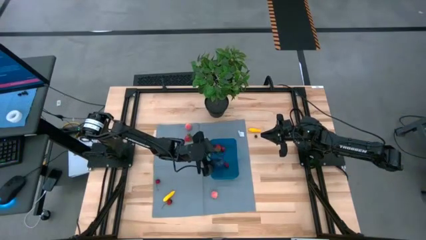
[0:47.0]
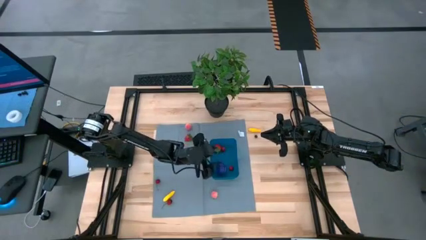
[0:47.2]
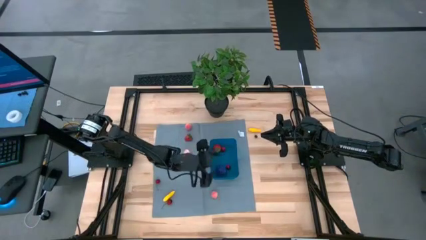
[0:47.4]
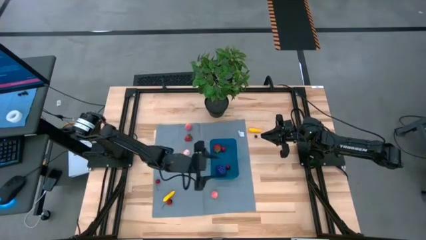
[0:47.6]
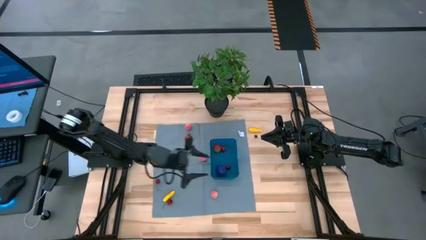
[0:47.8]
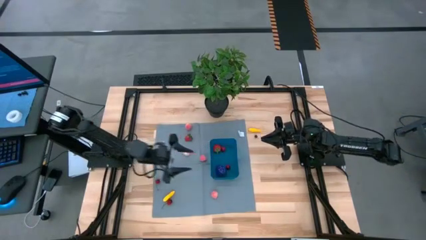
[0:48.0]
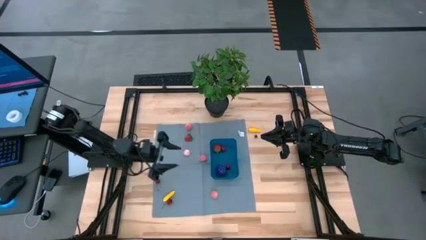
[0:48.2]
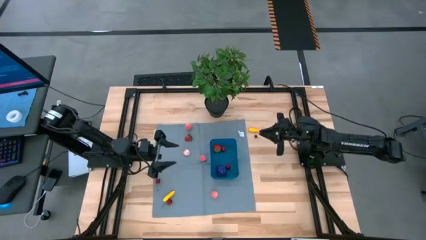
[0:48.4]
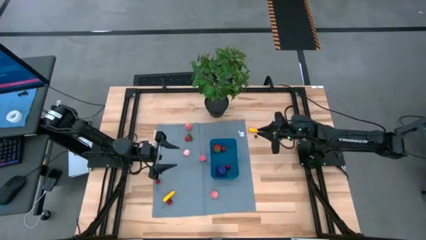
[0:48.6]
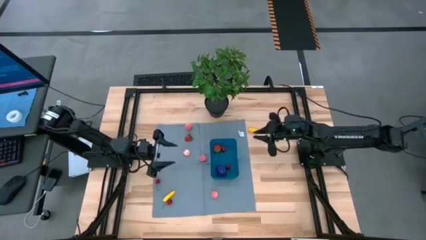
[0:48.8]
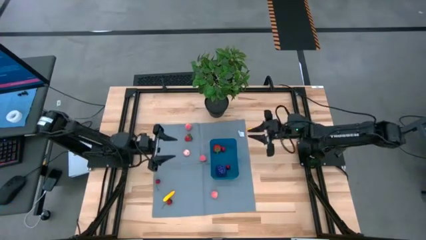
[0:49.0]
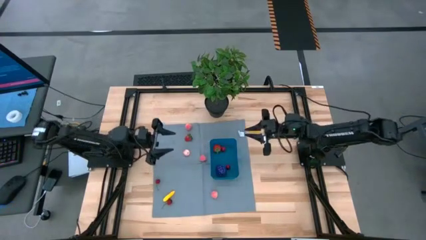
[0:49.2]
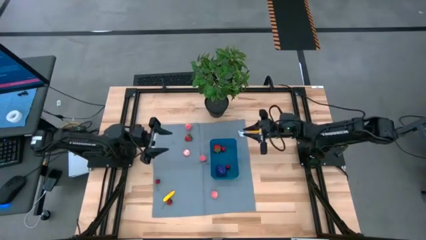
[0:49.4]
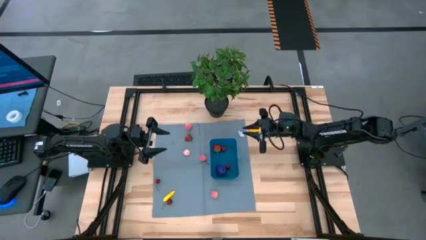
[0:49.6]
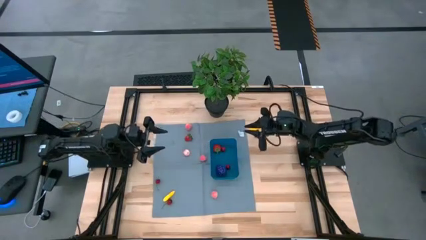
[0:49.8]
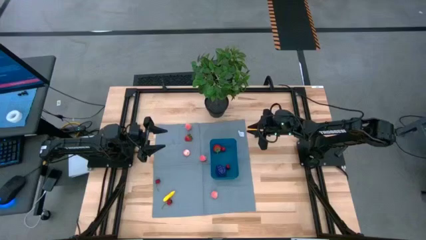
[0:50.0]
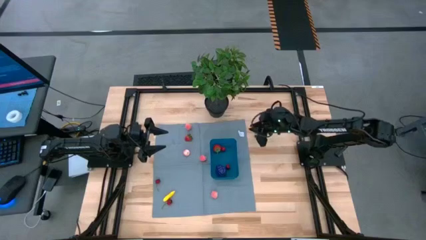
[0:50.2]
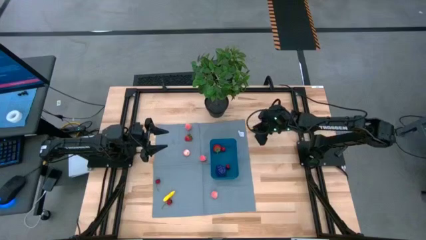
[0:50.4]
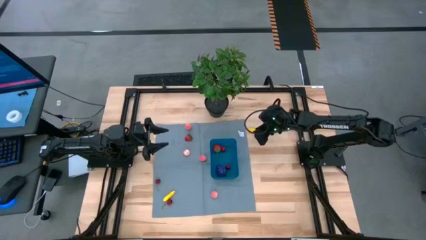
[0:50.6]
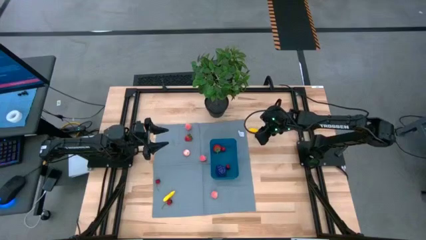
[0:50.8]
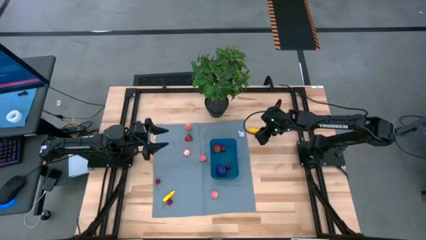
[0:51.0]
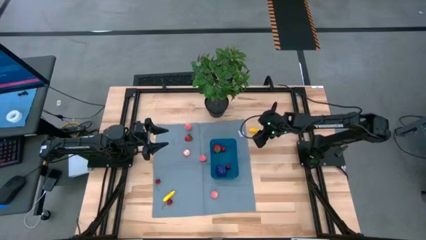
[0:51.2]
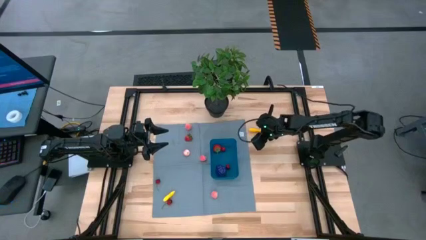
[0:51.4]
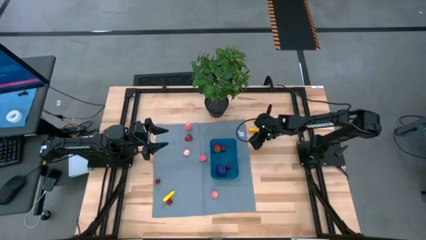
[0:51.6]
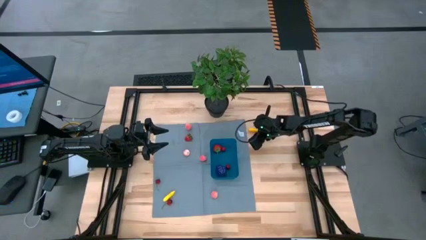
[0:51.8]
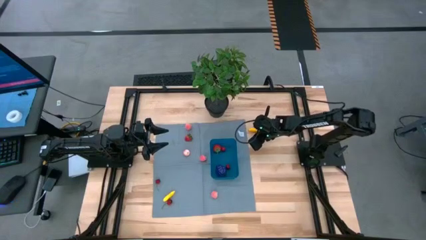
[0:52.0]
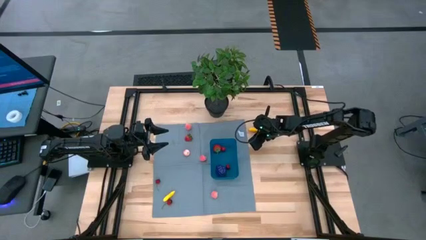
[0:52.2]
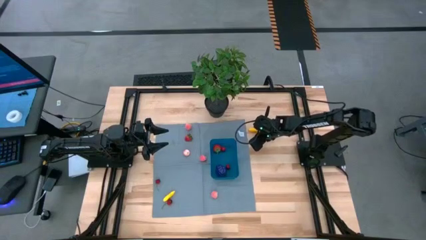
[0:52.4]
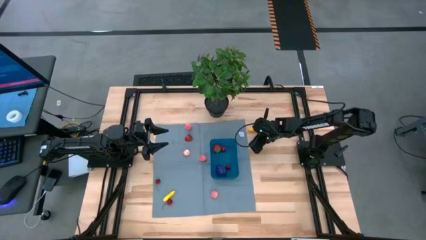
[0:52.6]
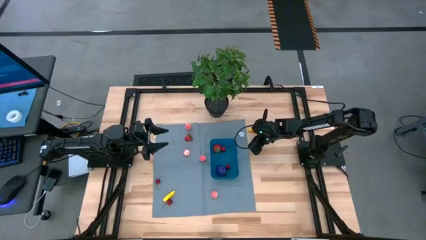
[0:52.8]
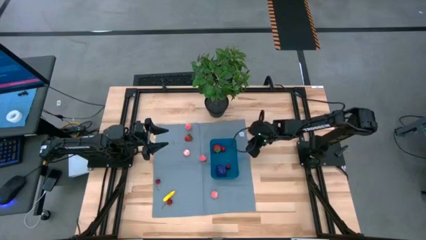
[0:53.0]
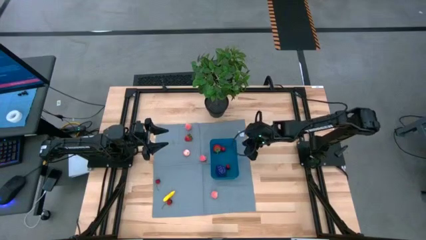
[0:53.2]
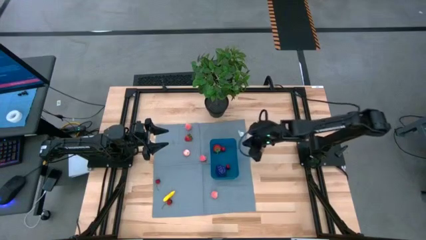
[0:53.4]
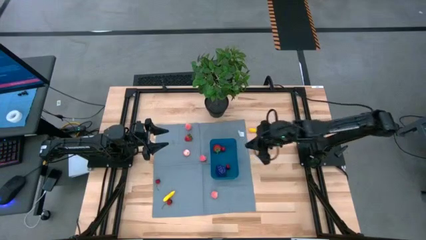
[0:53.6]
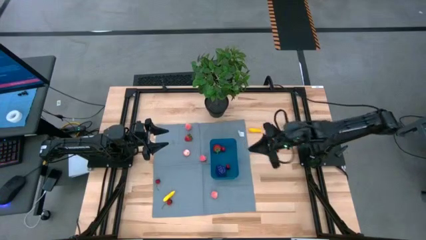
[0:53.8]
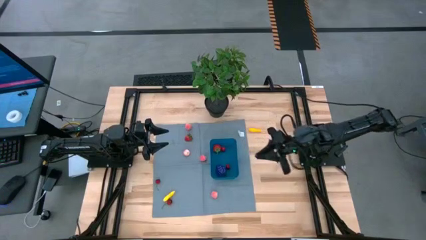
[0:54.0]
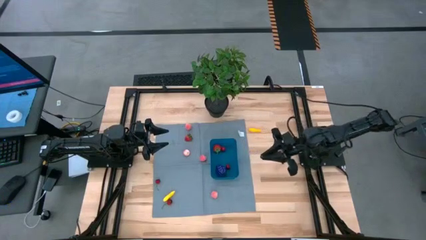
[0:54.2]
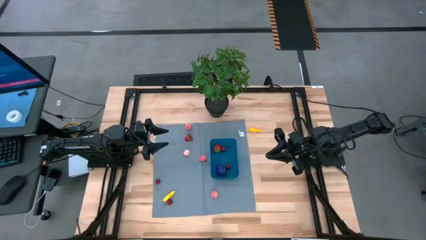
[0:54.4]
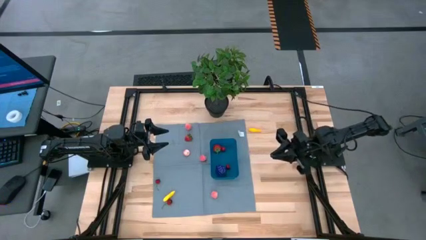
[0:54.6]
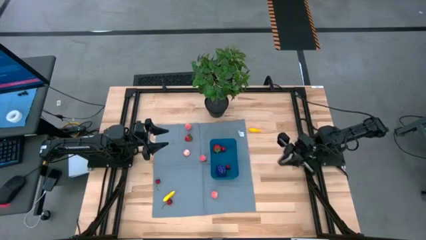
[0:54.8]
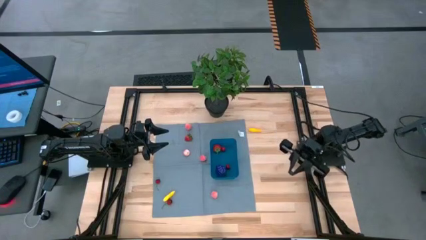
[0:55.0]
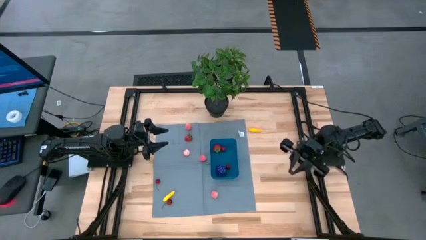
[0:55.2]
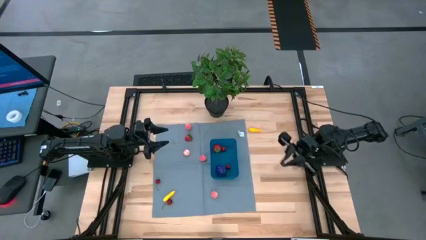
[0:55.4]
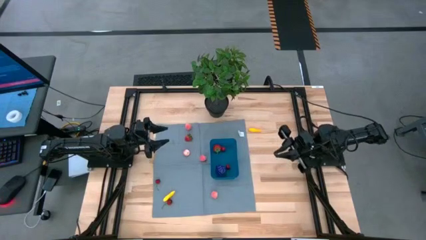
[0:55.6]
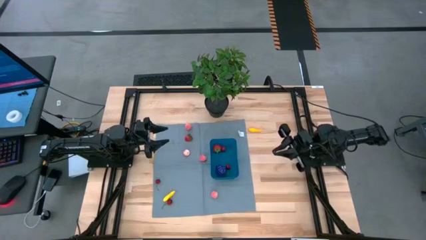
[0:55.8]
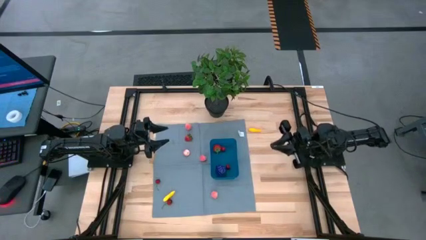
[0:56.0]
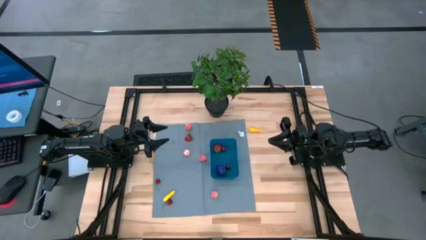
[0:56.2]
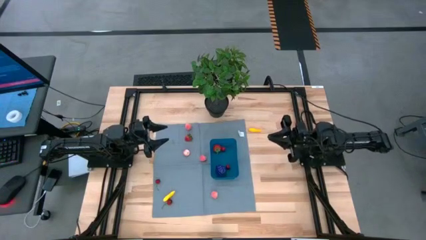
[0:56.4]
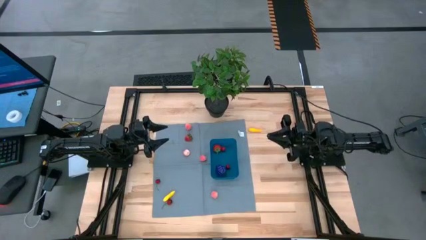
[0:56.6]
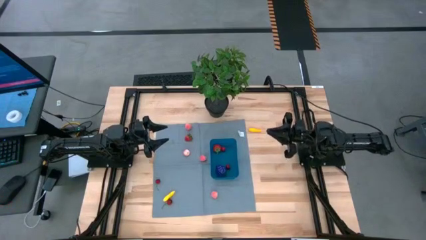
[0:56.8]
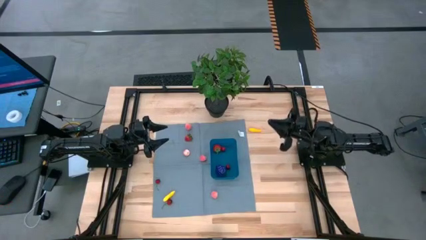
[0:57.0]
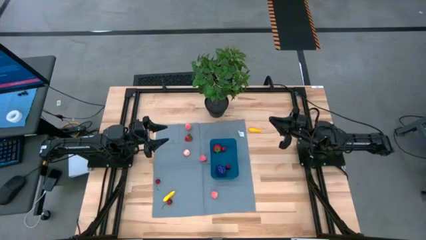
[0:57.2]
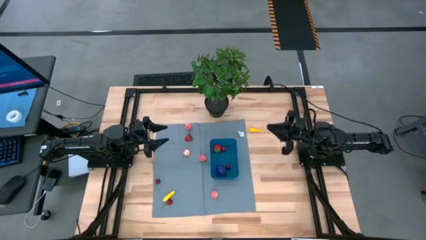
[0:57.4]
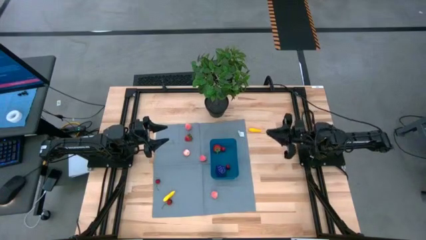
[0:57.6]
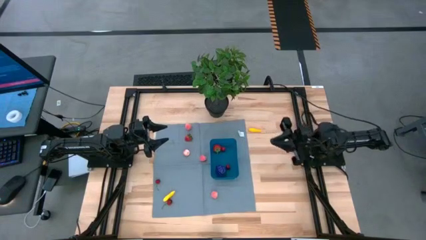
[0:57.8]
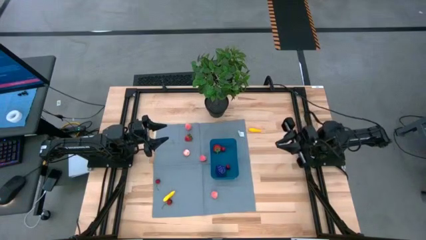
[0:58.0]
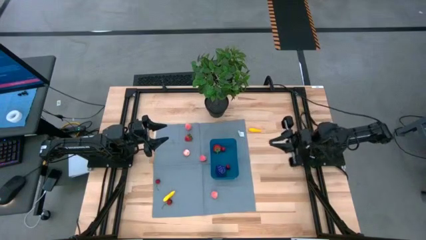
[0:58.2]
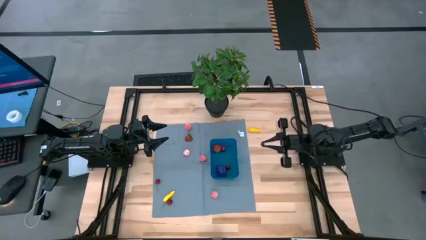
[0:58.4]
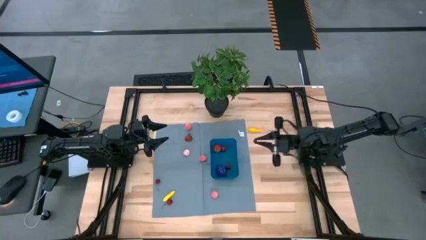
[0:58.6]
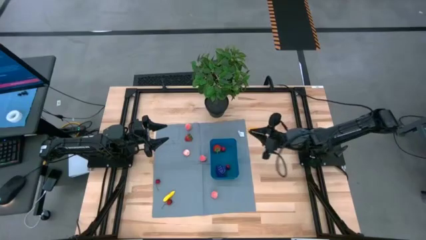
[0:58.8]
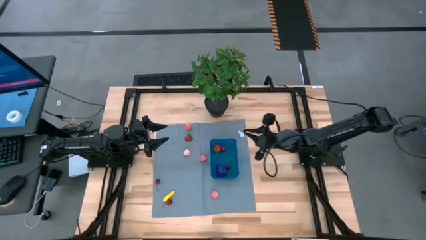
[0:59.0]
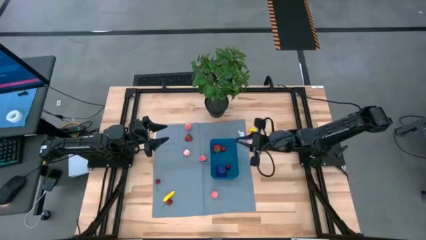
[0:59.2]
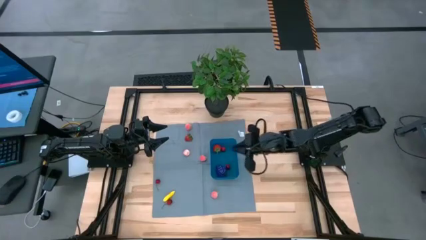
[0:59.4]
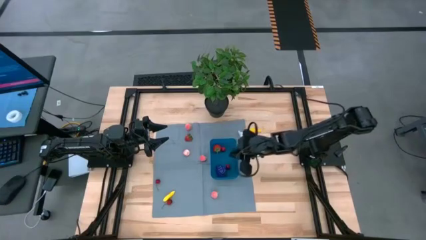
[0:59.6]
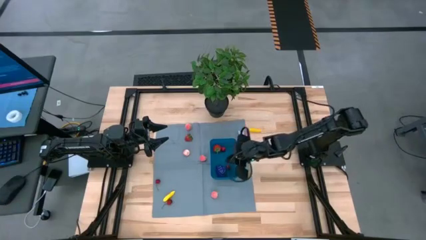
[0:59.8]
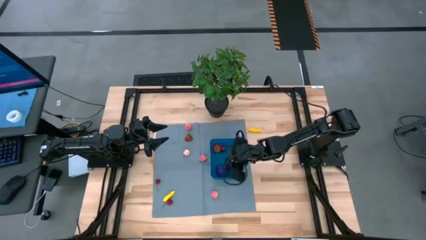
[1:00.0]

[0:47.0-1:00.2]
Task: Pick and placing Produce into tupperware
Put the blueberry into the bin
